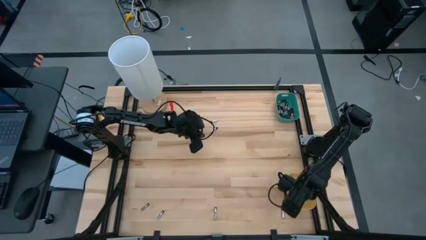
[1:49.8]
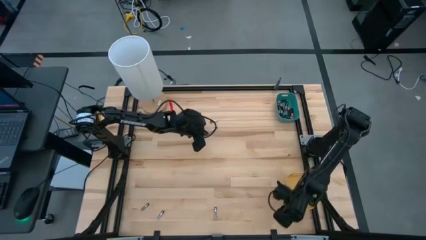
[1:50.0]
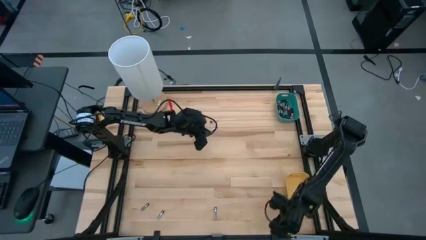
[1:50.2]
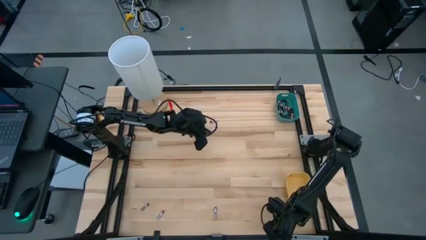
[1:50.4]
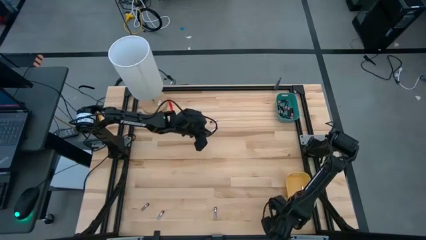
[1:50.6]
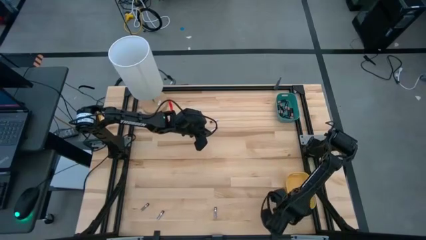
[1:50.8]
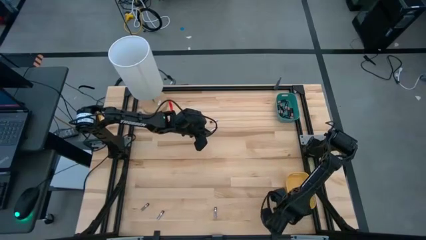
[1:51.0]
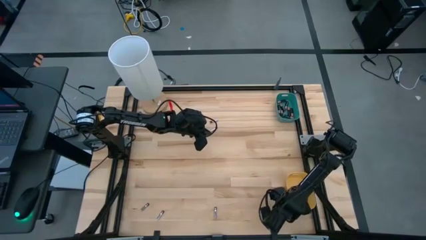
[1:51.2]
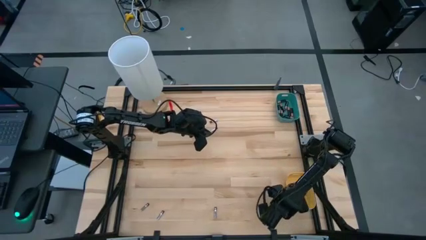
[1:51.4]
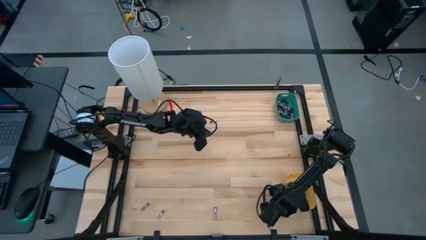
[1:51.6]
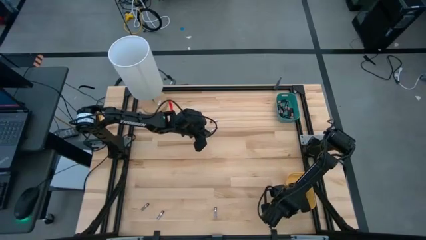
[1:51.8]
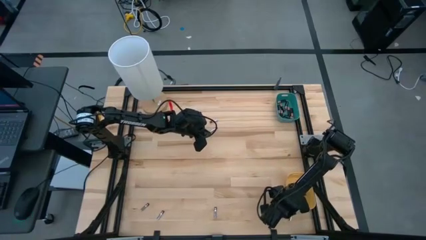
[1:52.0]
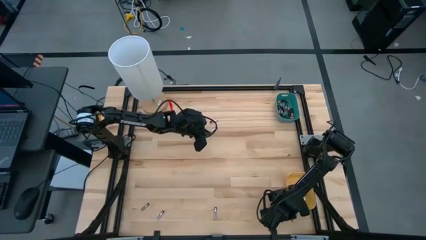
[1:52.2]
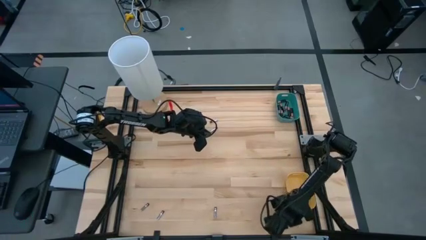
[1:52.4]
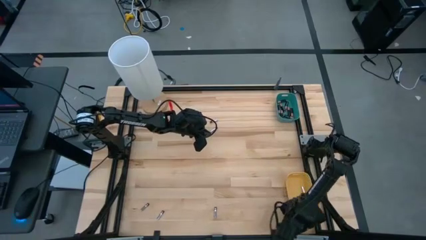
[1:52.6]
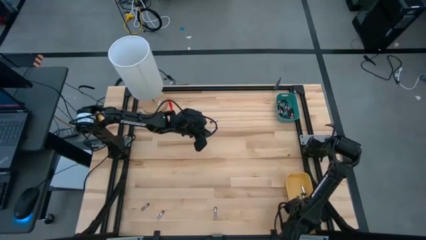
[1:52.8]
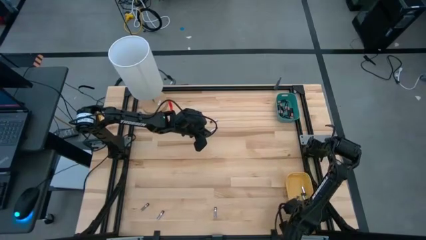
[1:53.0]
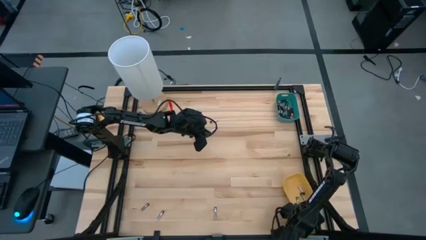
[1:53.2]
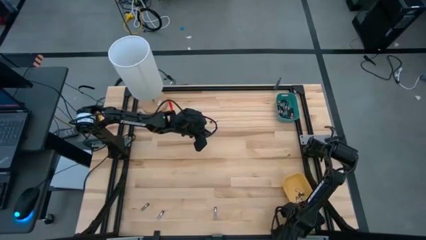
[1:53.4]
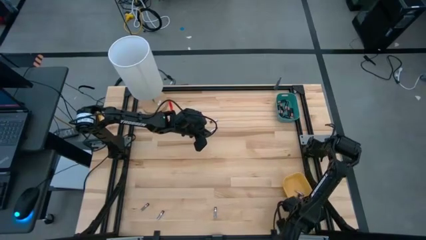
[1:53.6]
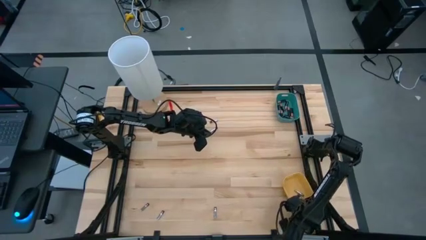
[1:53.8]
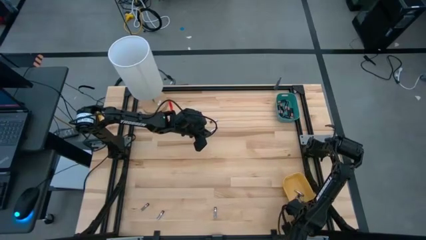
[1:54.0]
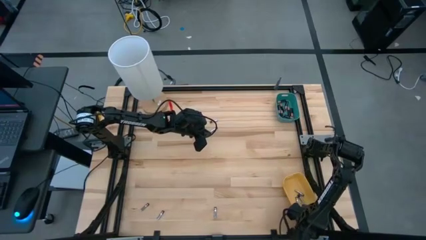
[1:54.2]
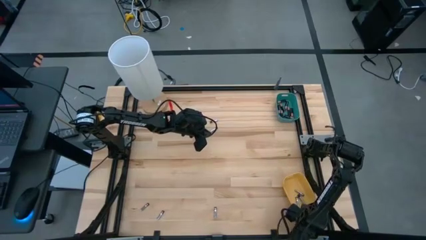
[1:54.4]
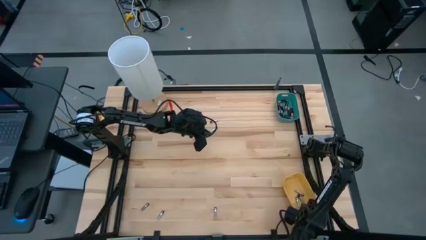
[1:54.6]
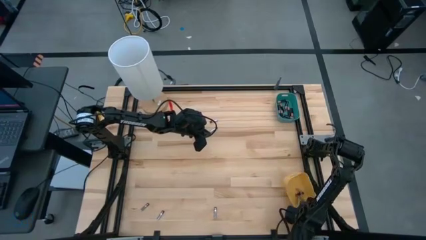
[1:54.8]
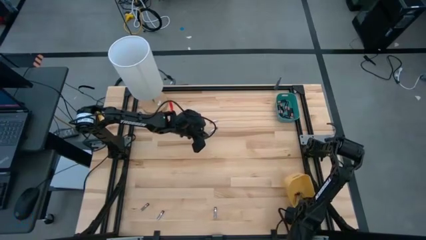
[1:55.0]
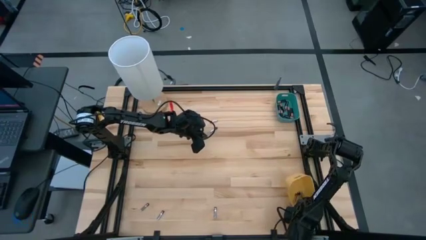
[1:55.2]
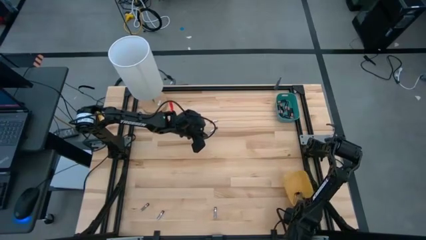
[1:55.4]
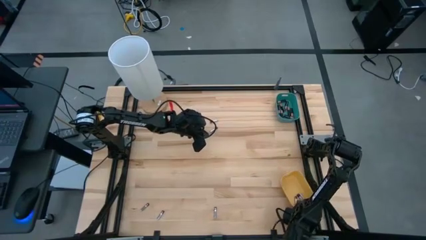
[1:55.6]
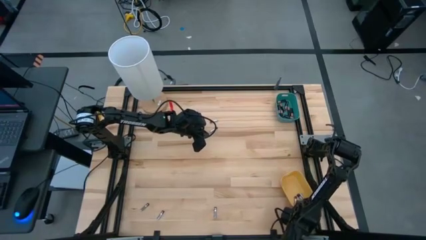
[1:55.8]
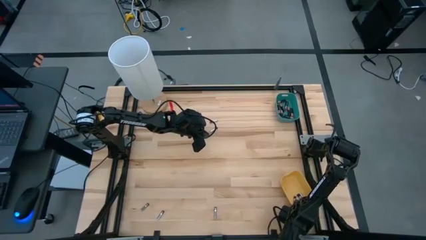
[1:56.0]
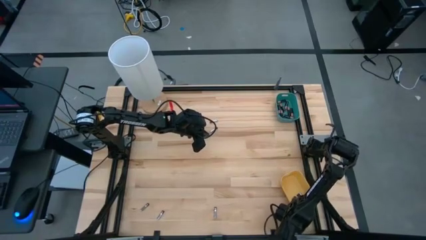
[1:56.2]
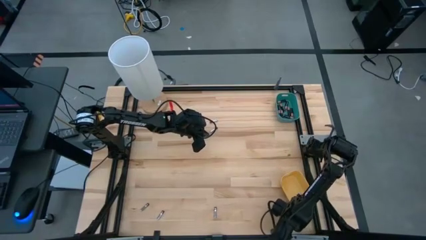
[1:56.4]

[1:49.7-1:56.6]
Task: Sort batteries
Put the silver battery into the yellow bin

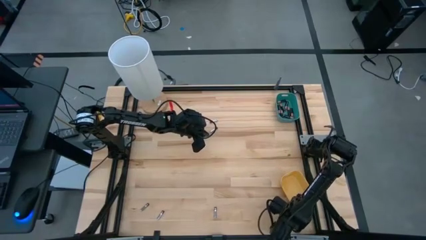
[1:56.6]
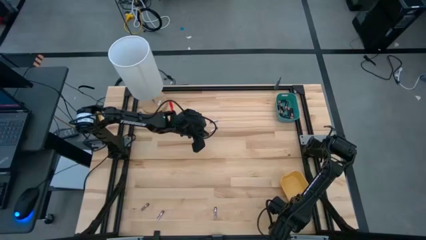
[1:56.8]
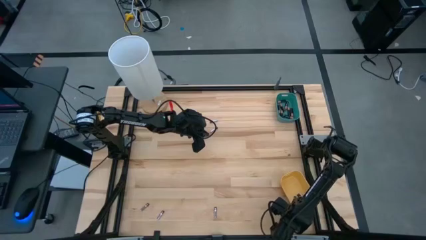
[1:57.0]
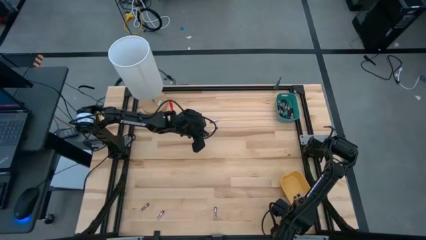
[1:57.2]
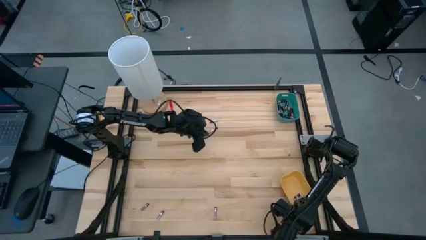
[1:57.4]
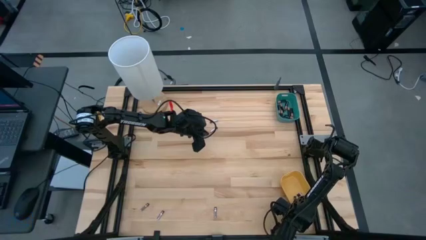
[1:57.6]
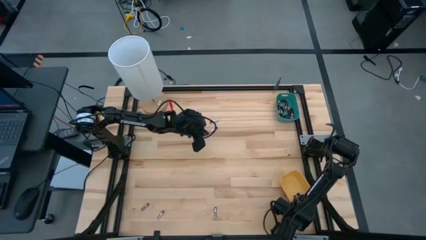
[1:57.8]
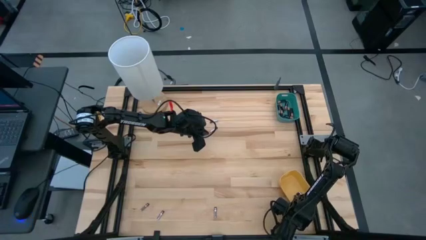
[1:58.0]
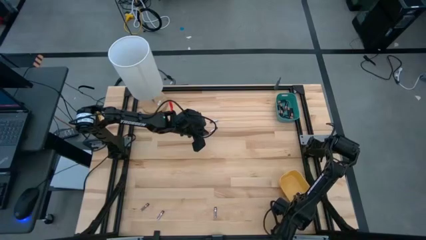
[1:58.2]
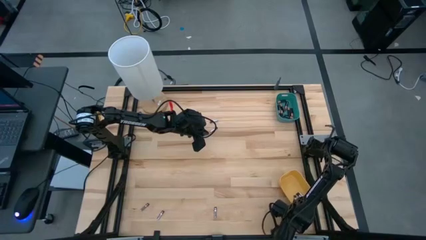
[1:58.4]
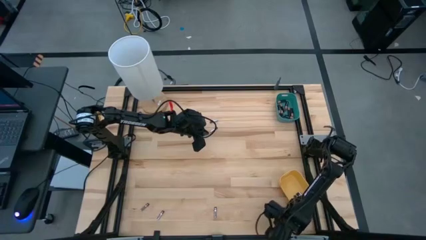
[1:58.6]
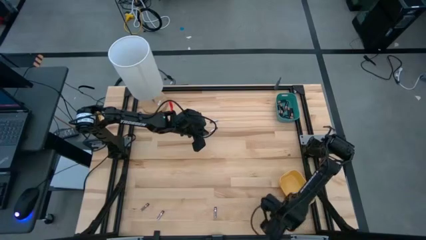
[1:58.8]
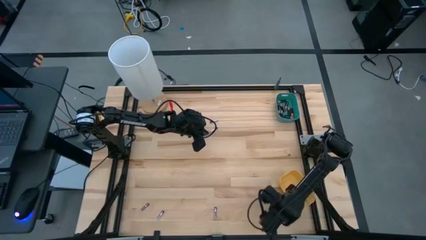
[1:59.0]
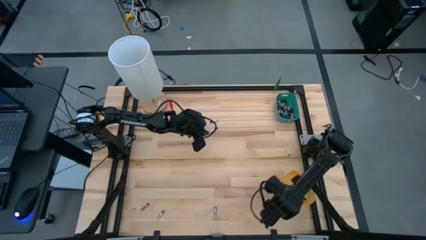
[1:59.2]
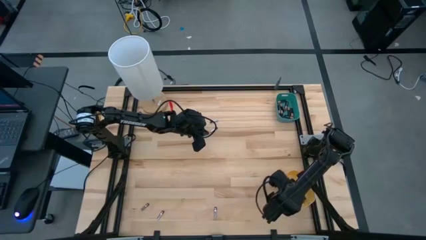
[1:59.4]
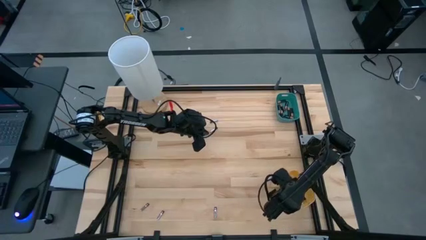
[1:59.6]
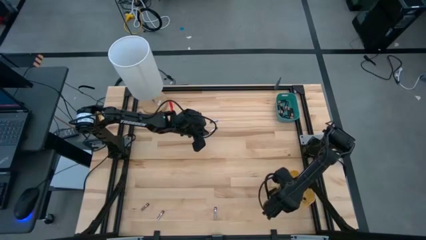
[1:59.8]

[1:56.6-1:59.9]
Put the silver battery into the yellow bin

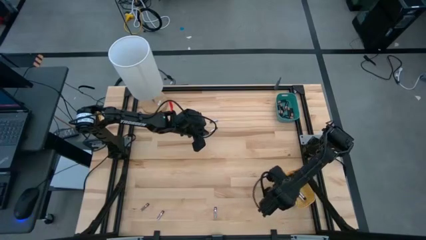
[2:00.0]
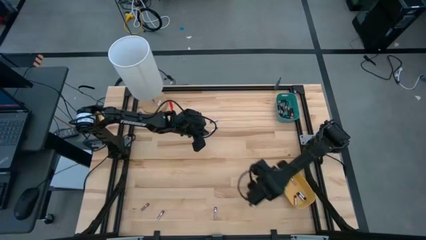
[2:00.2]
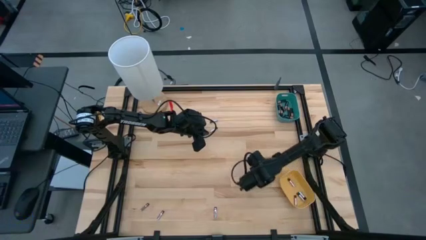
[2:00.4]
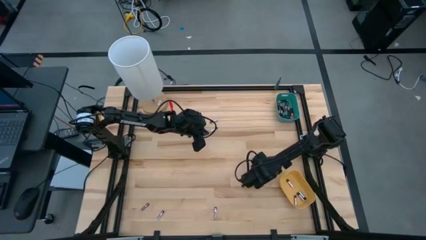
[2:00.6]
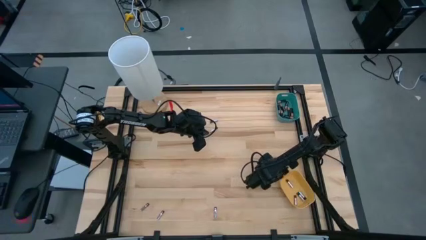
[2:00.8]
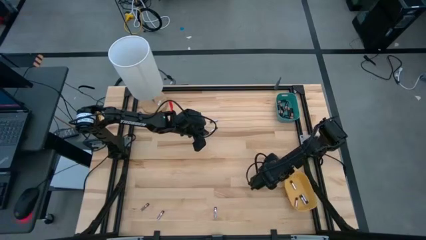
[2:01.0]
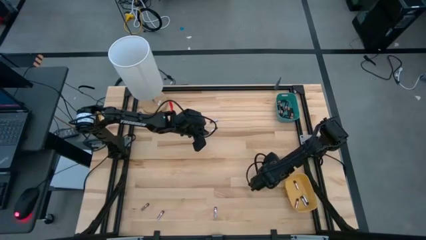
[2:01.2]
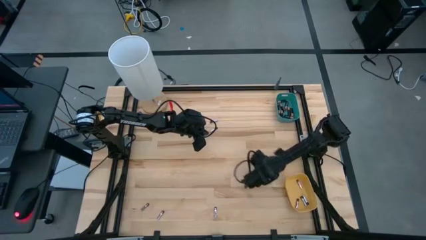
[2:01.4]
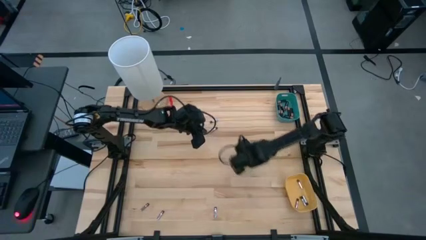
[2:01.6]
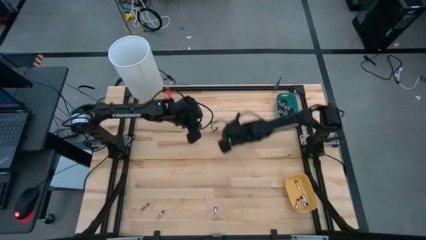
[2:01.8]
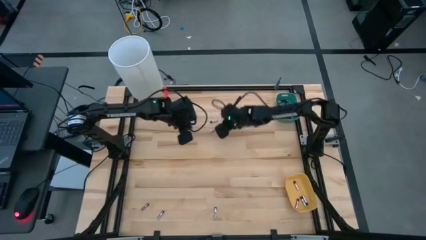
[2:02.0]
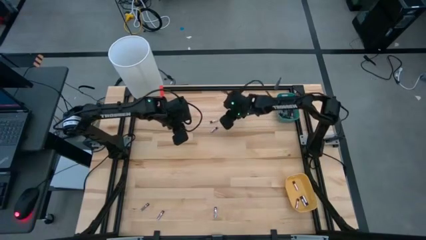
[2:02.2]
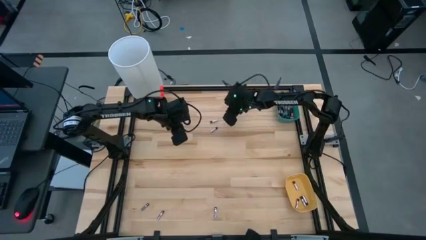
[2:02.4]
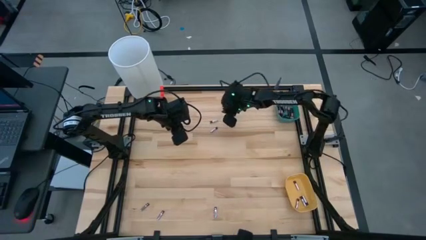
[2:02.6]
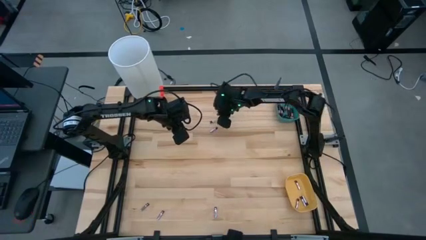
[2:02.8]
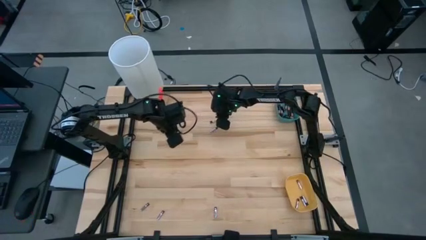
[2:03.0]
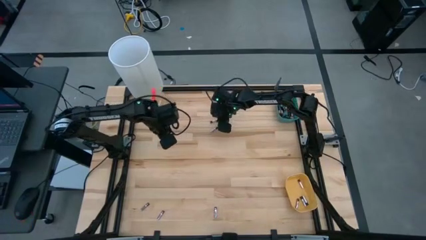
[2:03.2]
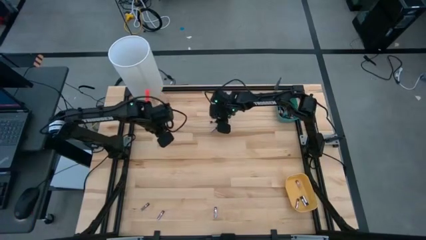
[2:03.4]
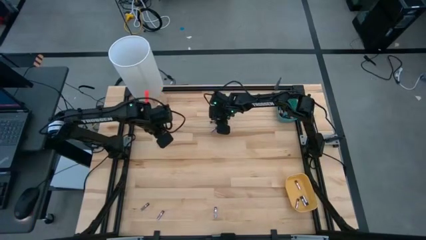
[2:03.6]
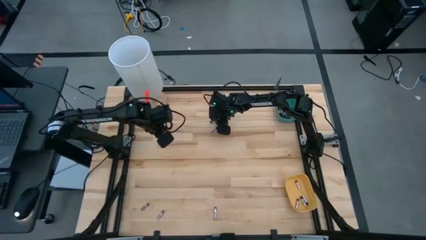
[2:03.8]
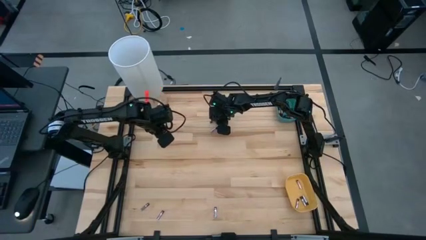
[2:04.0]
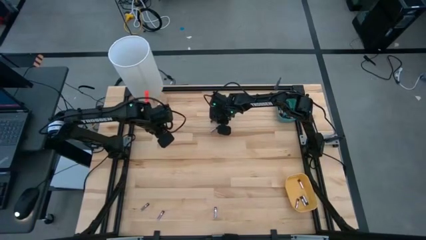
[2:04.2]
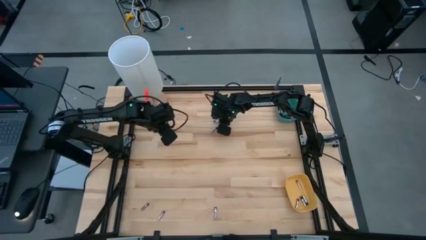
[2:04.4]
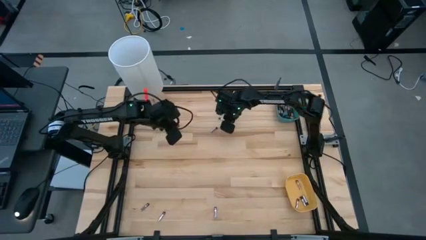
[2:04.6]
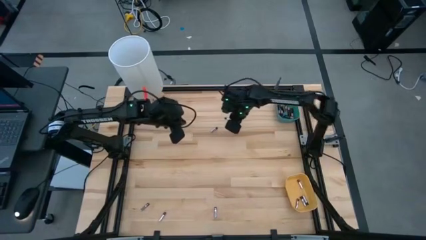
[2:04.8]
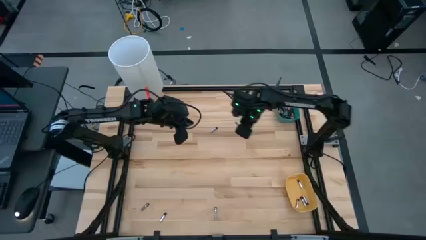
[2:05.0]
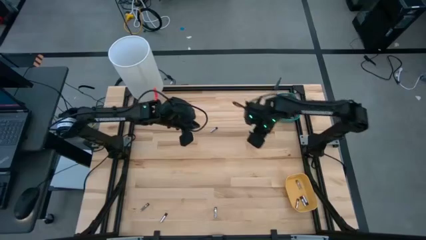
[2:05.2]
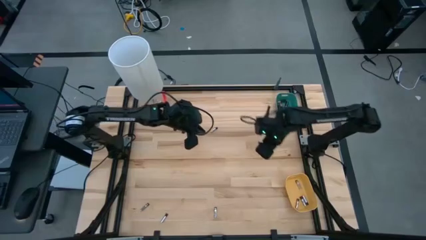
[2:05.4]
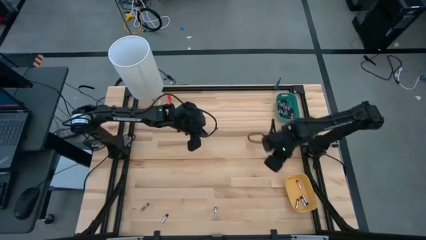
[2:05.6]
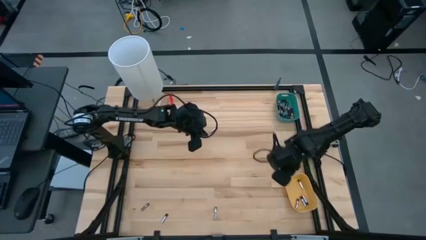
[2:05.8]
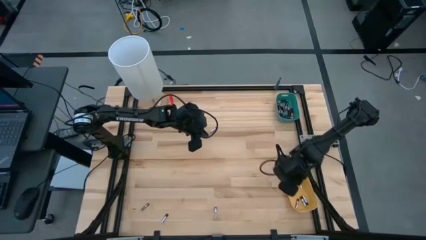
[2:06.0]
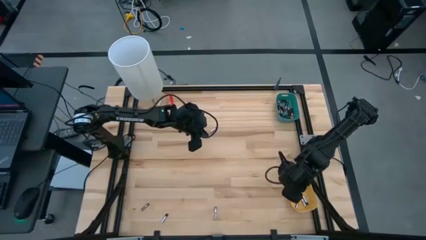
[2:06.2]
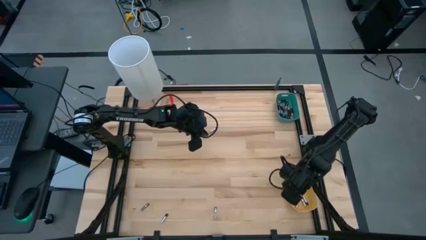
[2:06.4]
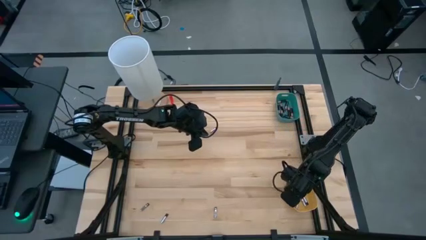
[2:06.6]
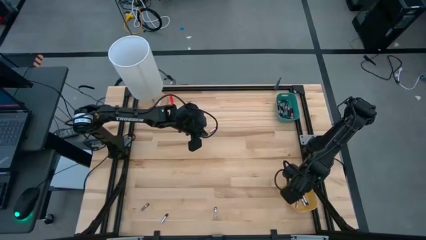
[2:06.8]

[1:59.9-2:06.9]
Put the silver battery into the yellow bin
